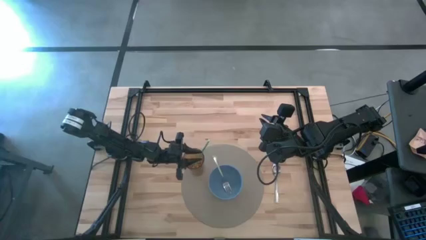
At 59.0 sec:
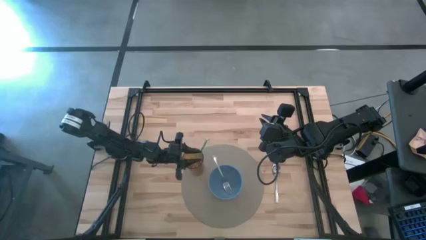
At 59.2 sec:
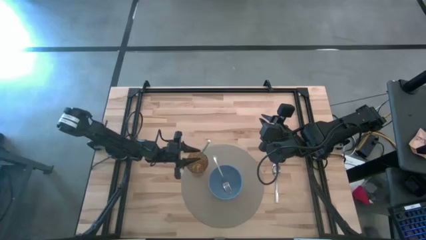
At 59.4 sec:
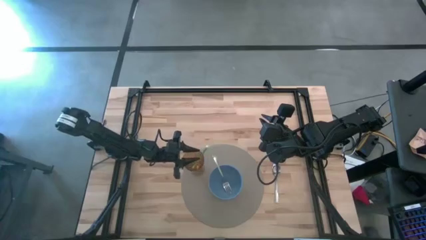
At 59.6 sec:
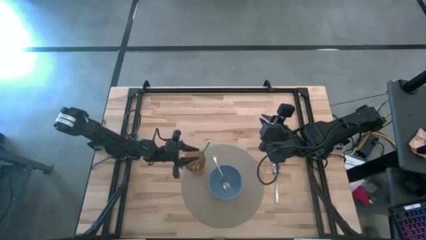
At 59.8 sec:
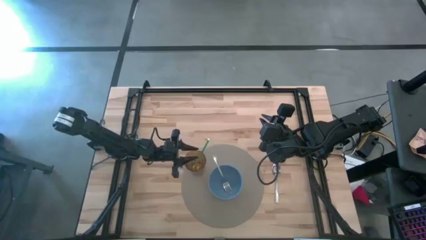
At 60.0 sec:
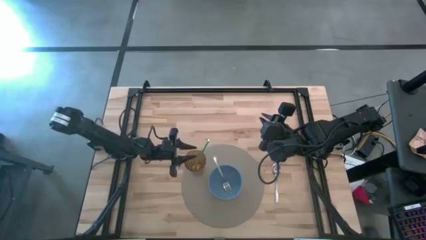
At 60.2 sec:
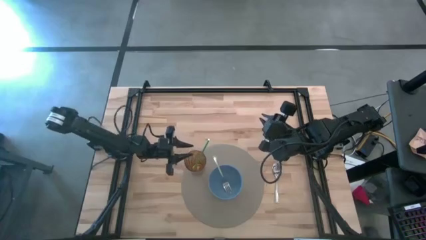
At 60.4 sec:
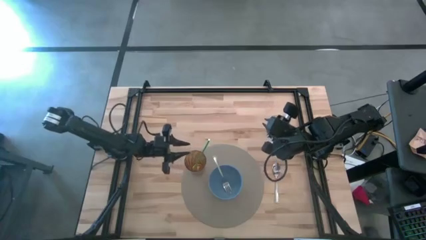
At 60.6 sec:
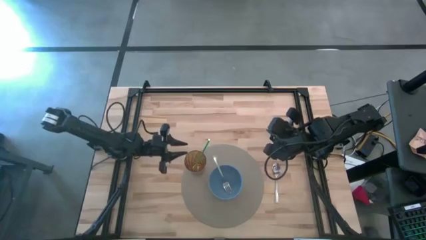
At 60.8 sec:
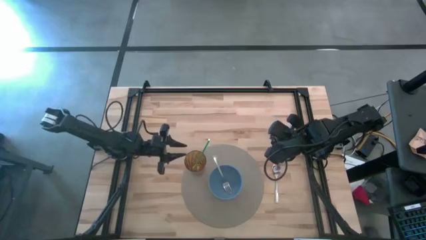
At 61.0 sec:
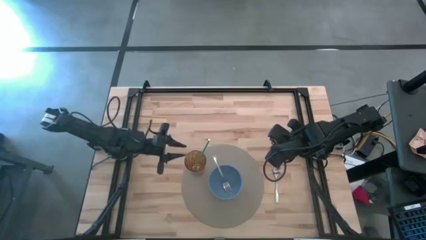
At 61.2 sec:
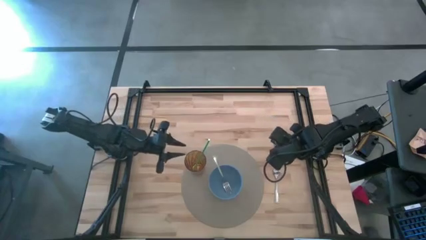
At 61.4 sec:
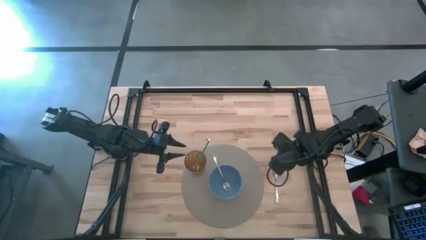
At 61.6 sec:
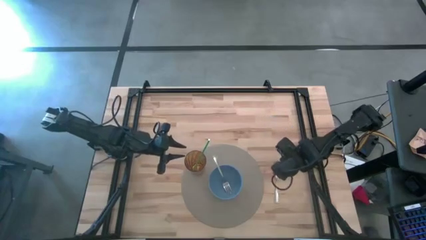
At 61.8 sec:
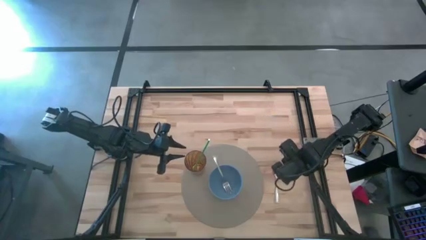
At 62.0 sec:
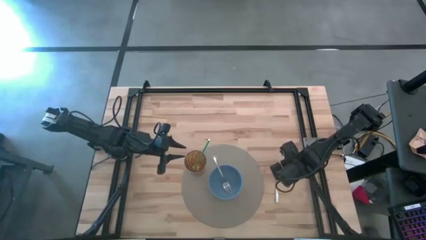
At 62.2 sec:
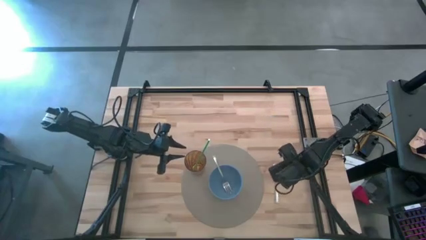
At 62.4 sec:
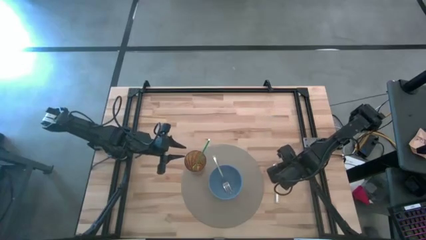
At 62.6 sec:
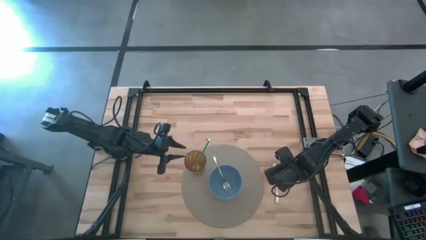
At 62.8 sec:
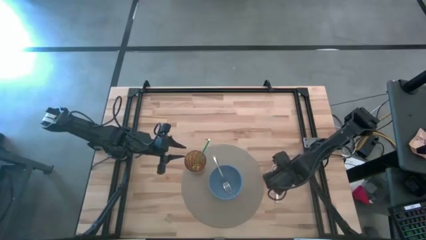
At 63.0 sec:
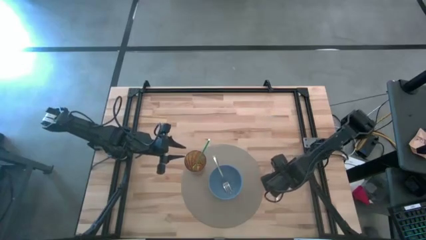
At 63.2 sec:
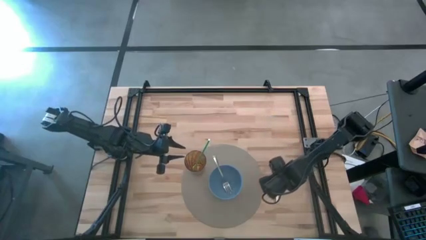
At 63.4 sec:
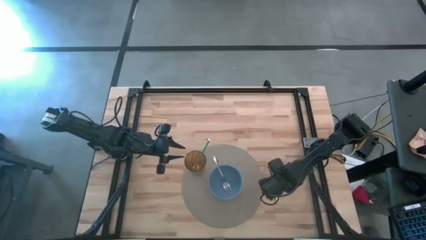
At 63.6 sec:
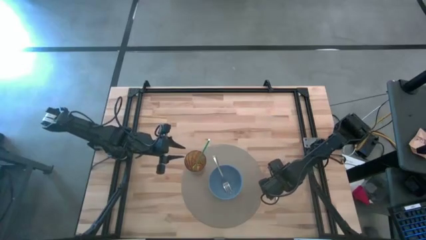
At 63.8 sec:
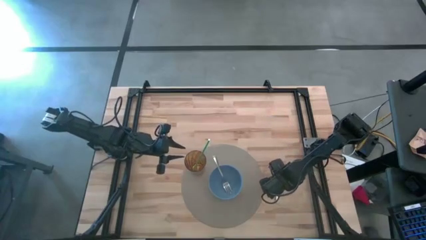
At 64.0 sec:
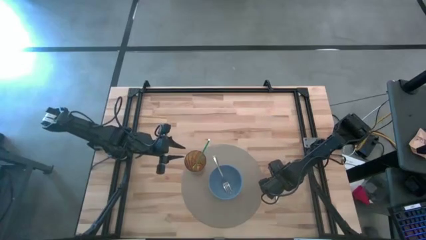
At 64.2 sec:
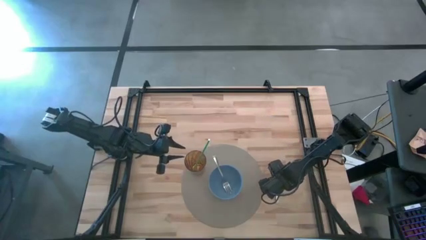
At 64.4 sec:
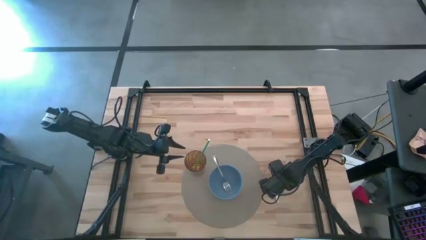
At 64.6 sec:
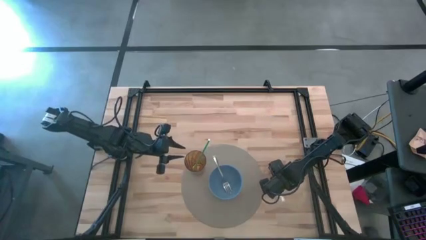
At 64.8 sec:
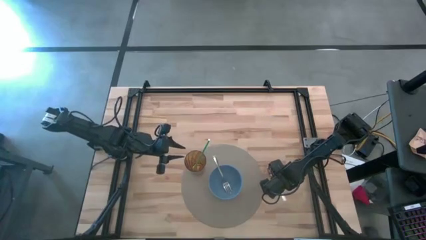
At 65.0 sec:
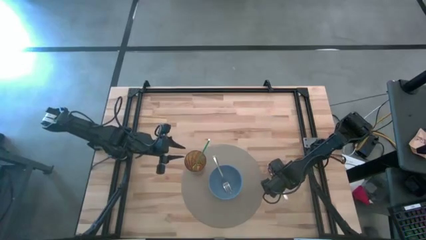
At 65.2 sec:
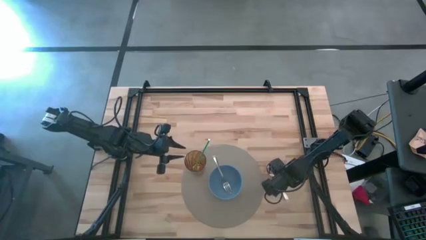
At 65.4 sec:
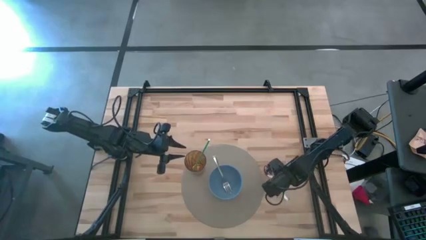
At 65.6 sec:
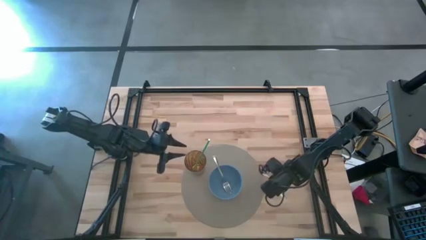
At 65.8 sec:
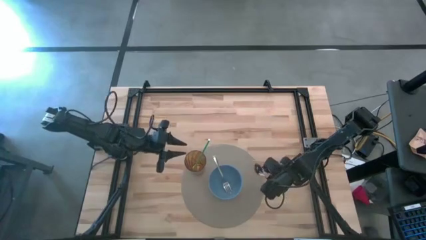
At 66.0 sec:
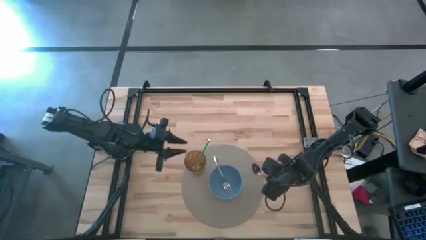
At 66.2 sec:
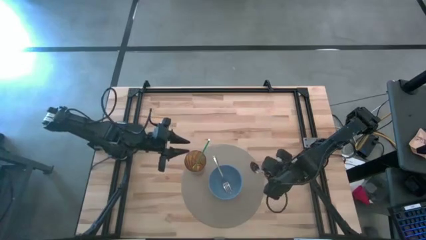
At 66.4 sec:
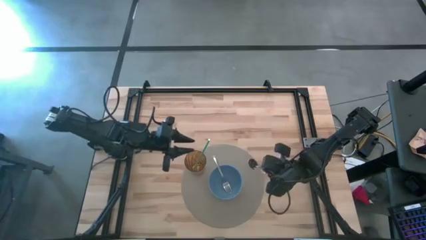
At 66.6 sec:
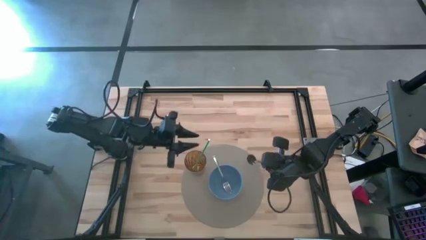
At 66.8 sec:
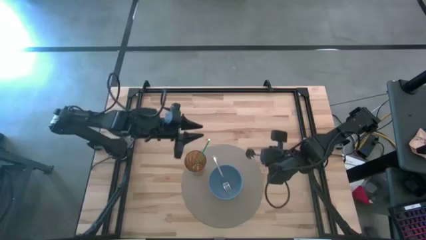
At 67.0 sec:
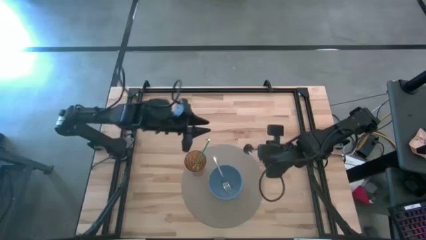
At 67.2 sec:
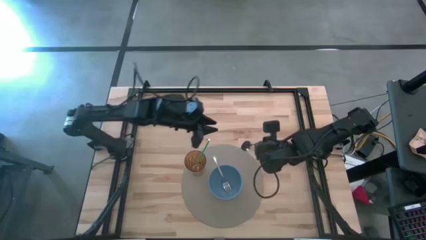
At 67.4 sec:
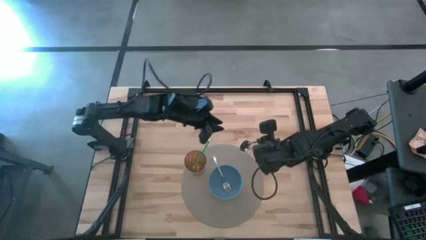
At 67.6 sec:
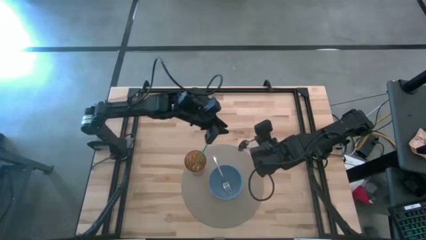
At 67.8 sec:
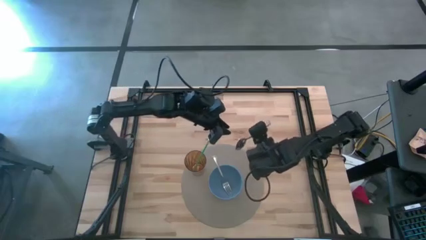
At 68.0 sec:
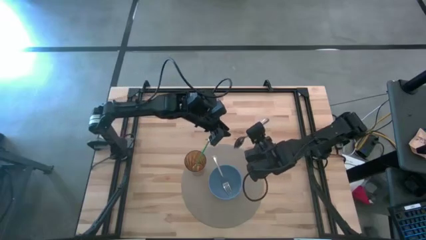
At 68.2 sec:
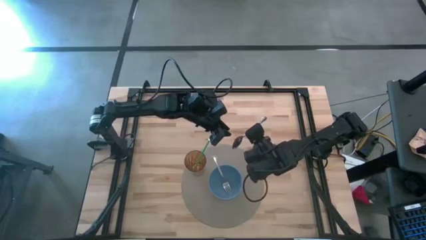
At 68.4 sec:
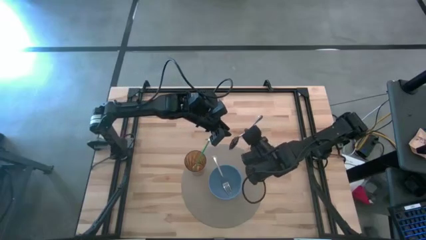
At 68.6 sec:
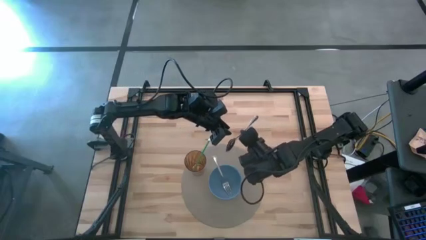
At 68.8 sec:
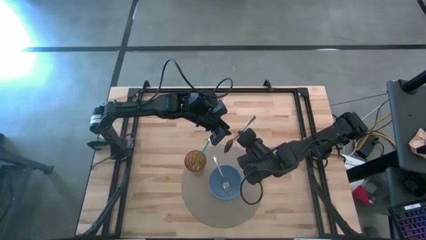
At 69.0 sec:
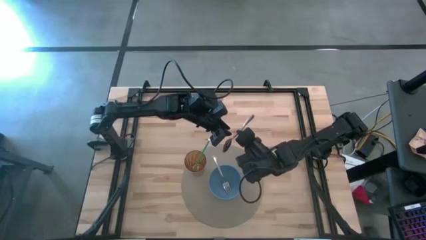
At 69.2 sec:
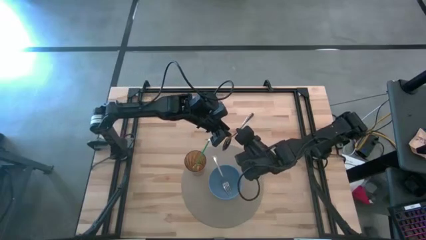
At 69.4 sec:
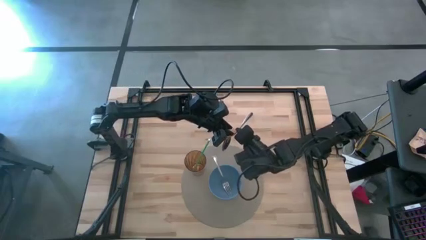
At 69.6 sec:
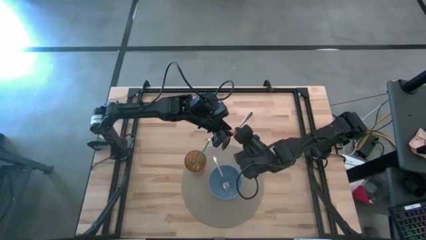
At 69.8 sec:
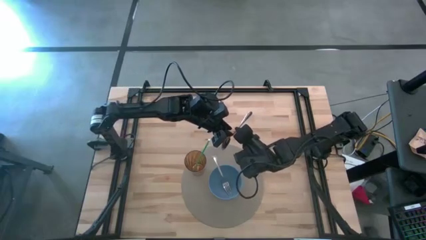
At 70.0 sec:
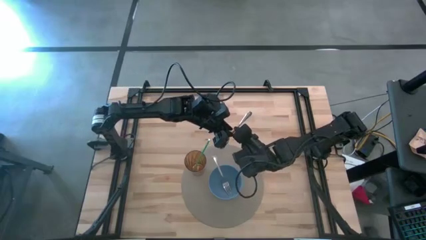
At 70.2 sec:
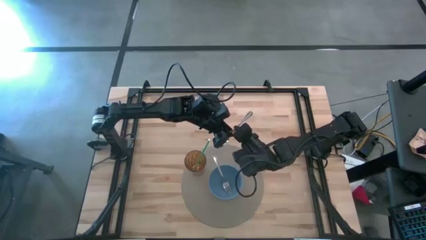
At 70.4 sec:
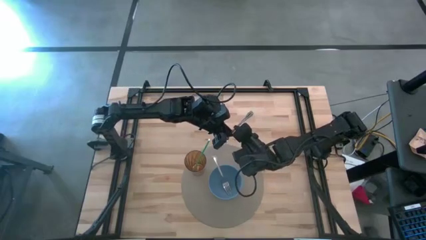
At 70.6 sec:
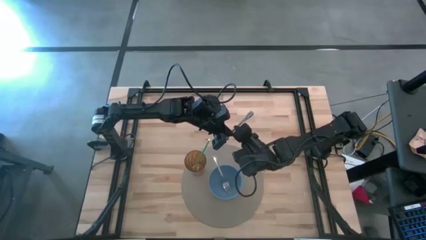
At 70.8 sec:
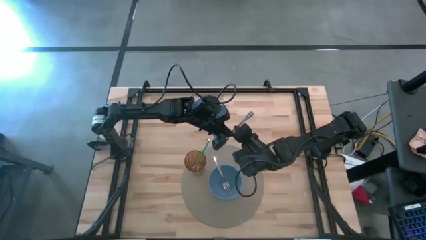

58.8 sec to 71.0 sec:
Task: Pick & Place Utensil
Put the spoon into the bowl on the place mat

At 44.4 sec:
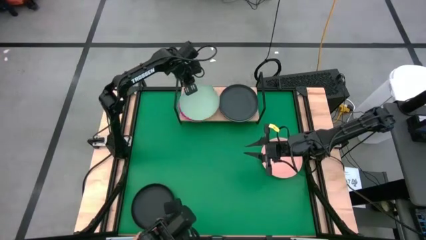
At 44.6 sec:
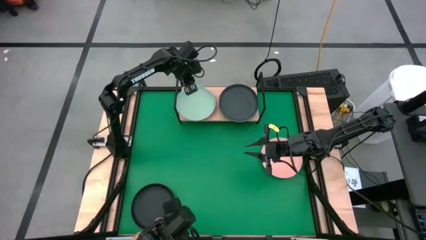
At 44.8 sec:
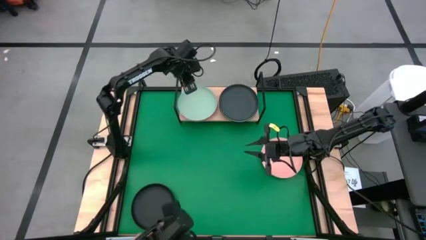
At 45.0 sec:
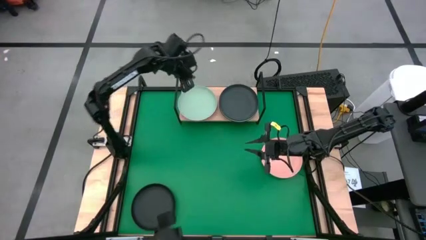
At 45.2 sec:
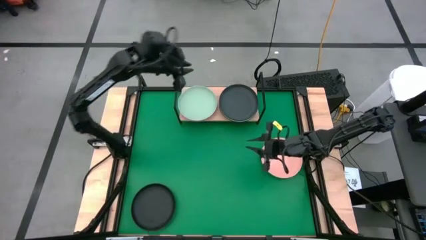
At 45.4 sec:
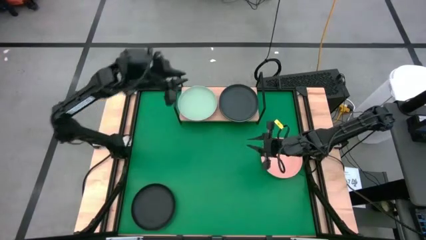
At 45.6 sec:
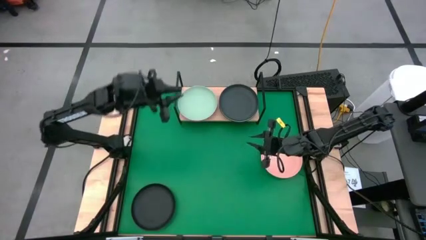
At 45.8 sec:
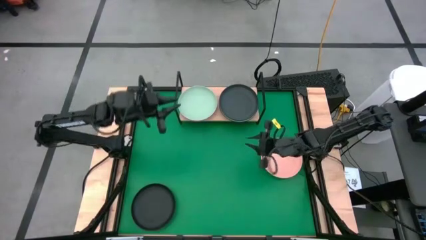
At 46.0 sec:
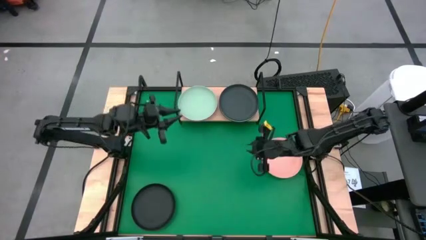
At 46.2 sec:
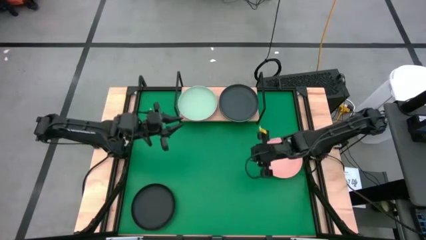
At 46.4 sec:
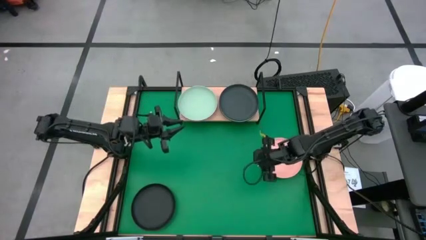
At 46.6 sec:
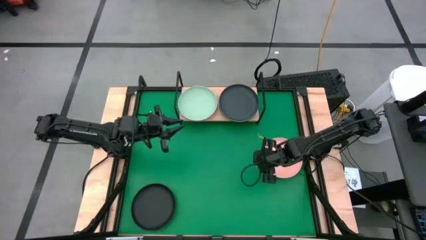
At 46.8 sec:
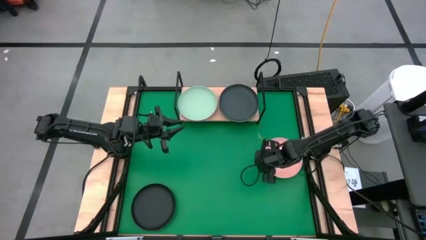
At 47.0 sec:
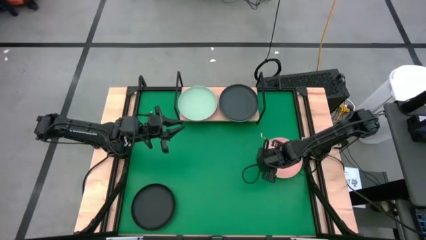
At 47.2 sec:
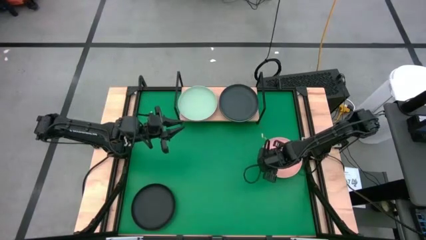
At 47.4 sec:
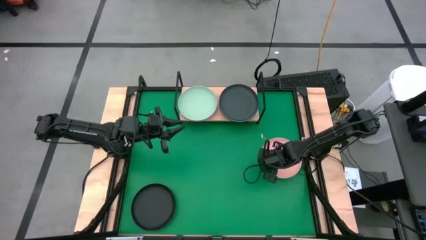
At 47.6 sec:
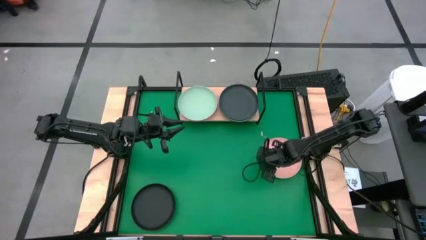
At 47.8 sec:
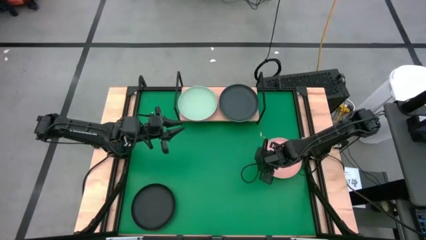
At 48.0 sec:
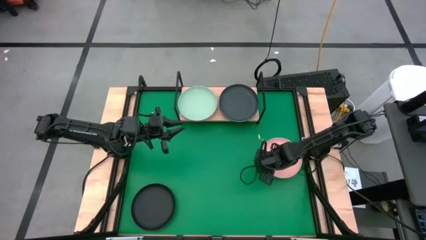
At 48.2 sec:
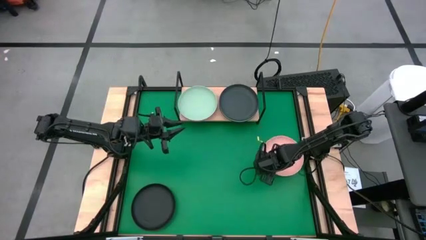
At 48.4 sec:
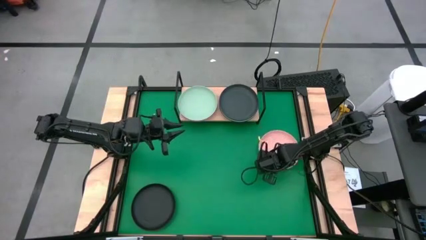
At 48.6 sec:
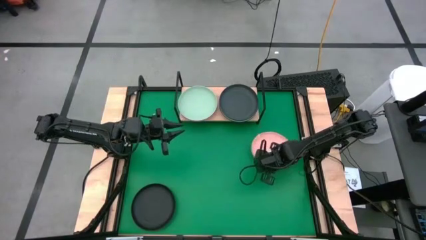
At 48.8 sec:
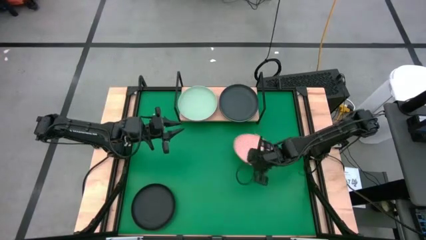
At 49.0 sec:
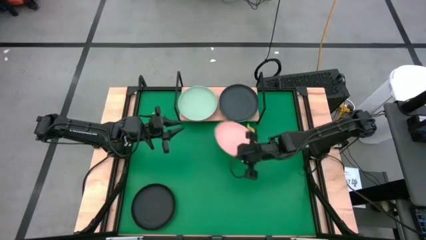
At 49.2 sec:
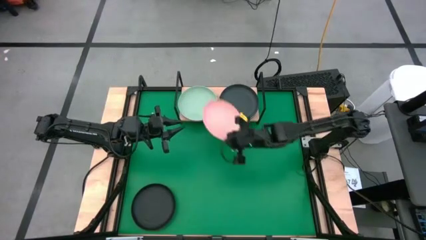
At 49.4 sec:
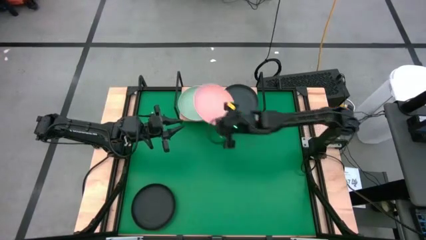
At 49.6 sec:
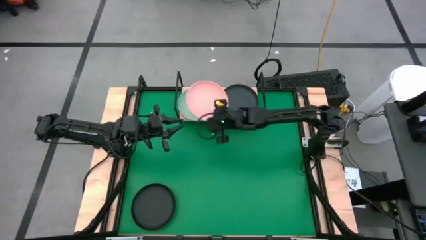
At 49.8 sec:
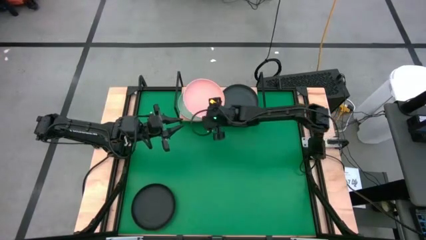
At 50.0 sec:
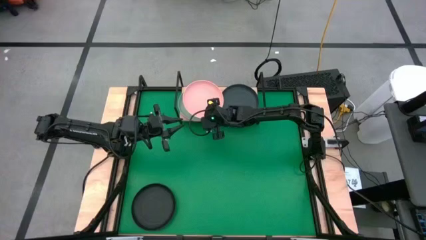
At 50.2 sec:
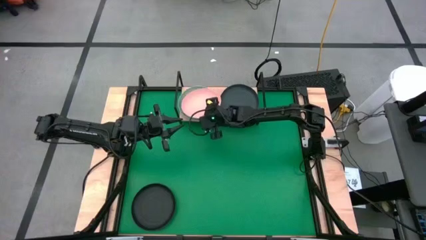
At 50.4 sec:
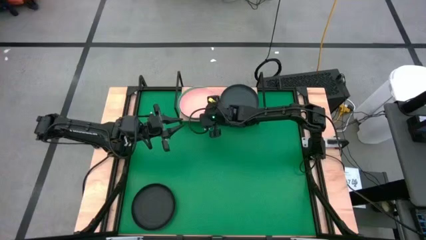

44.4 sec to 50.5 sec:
Task: Place and stack plates onto a shelf
Stack the light pink plate on top of the green plate on the shelf
